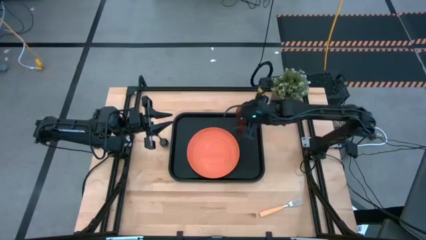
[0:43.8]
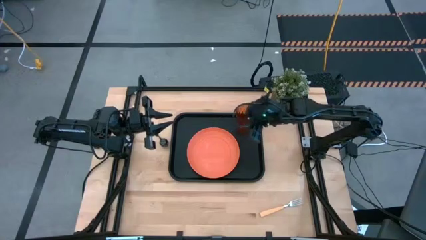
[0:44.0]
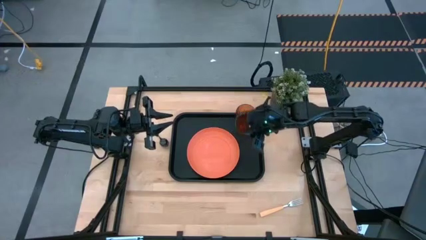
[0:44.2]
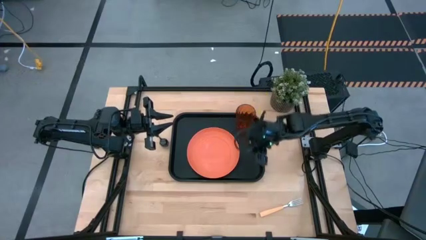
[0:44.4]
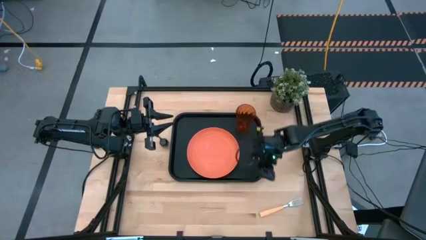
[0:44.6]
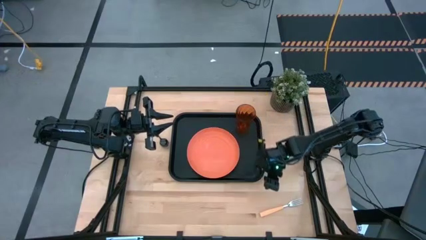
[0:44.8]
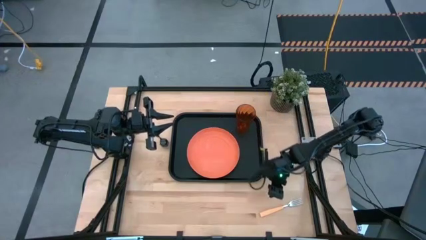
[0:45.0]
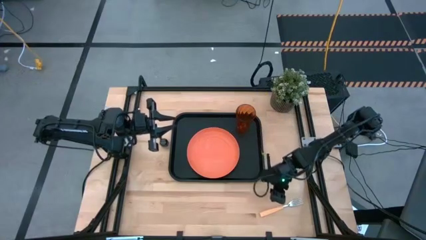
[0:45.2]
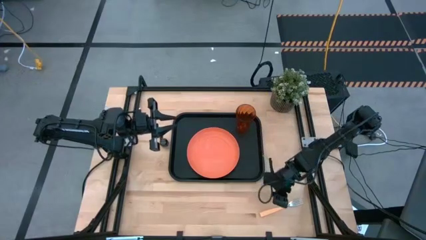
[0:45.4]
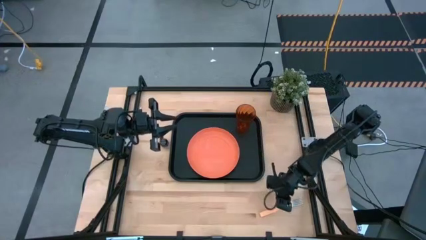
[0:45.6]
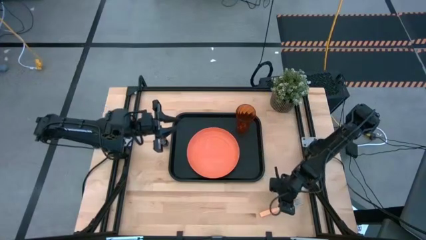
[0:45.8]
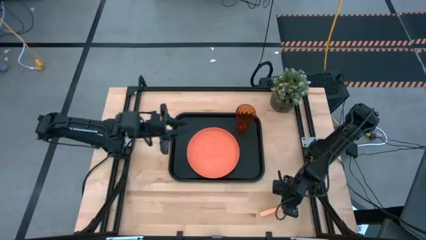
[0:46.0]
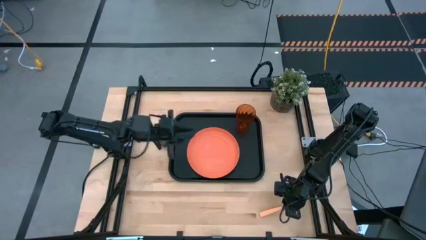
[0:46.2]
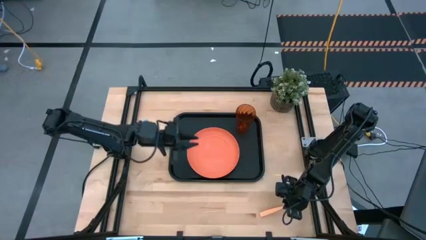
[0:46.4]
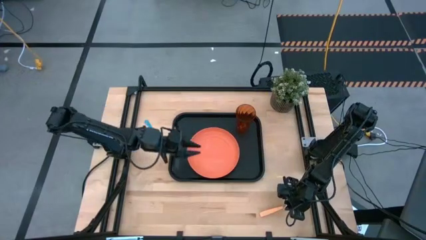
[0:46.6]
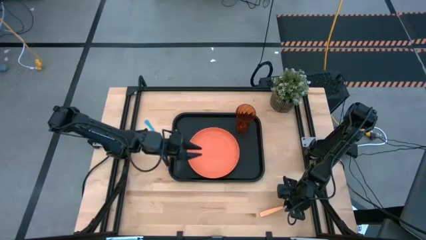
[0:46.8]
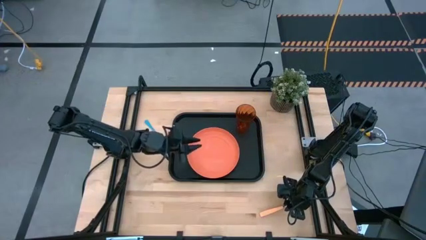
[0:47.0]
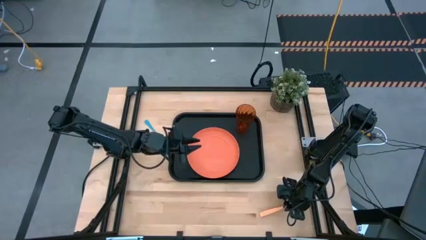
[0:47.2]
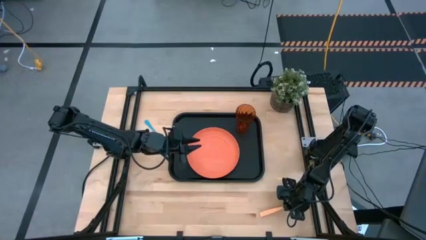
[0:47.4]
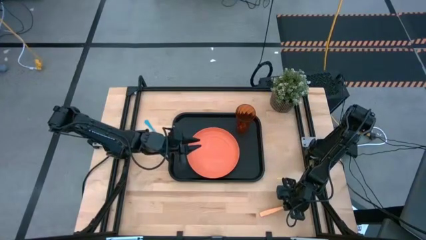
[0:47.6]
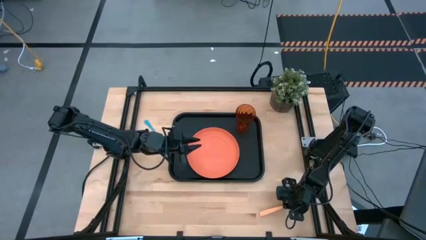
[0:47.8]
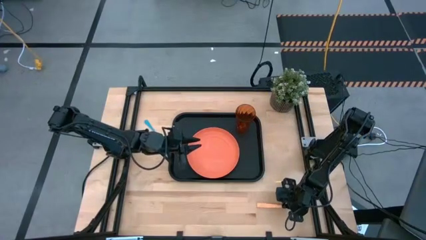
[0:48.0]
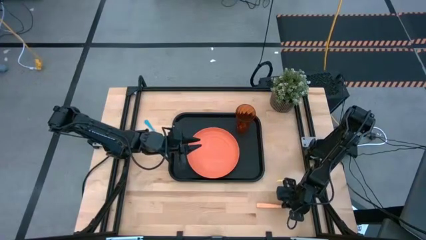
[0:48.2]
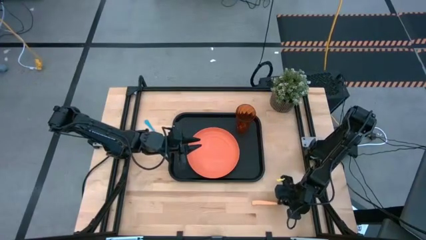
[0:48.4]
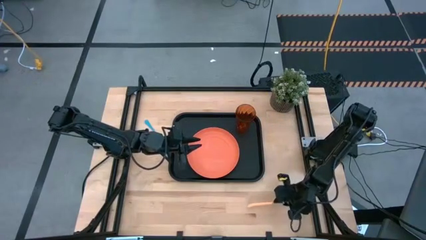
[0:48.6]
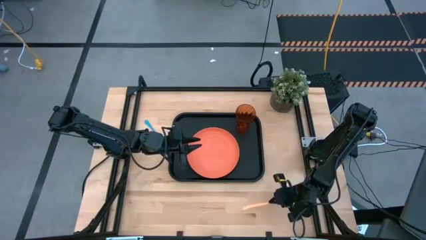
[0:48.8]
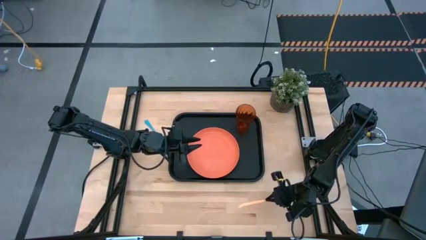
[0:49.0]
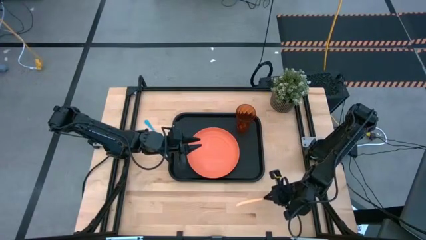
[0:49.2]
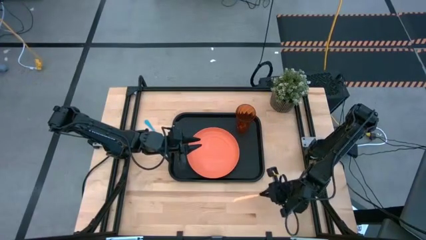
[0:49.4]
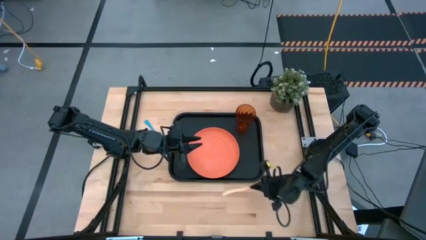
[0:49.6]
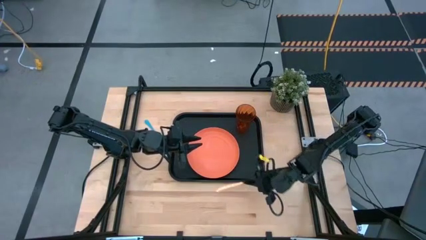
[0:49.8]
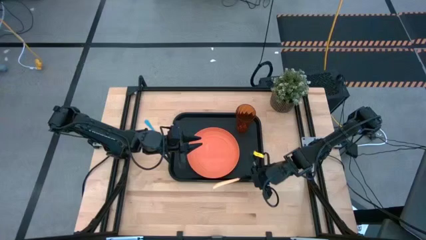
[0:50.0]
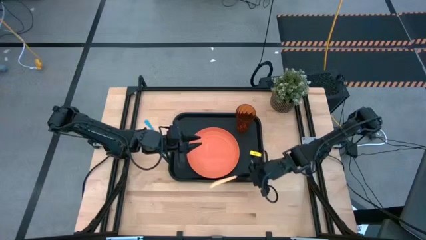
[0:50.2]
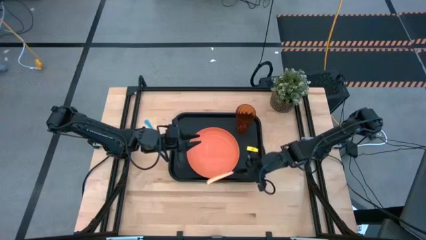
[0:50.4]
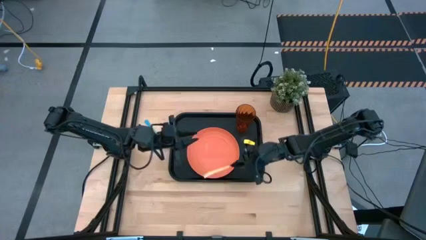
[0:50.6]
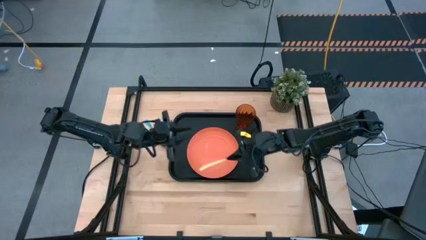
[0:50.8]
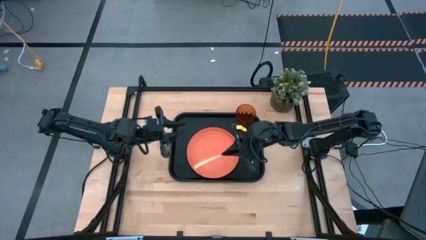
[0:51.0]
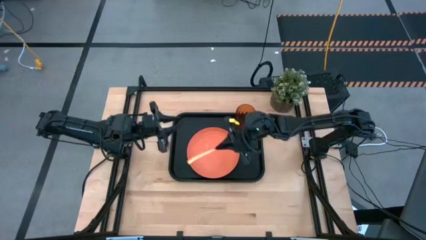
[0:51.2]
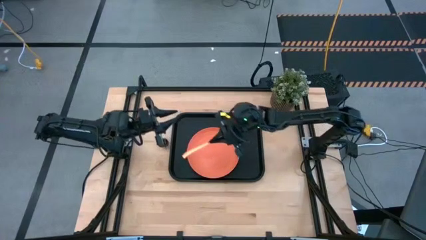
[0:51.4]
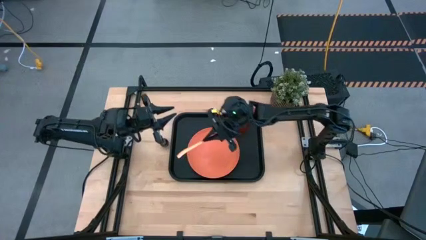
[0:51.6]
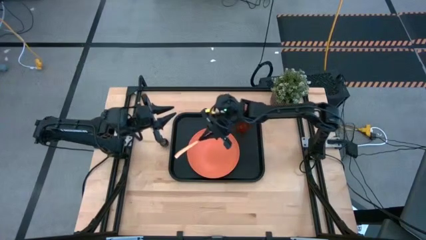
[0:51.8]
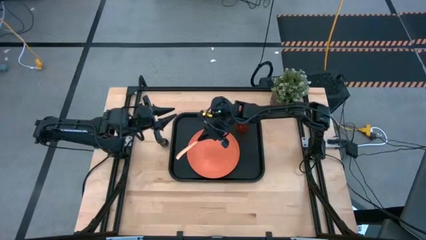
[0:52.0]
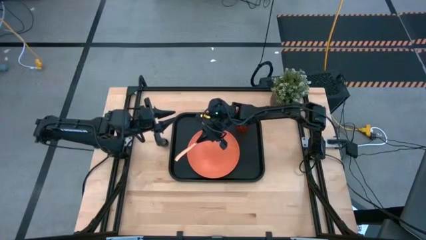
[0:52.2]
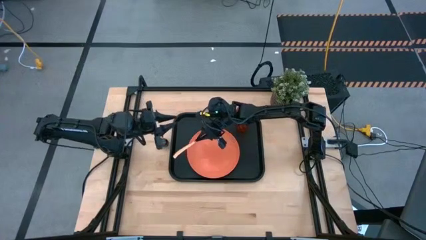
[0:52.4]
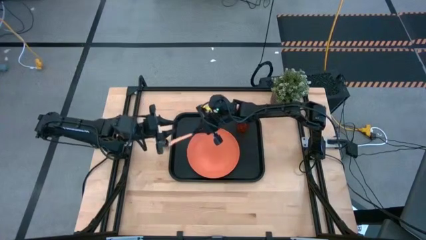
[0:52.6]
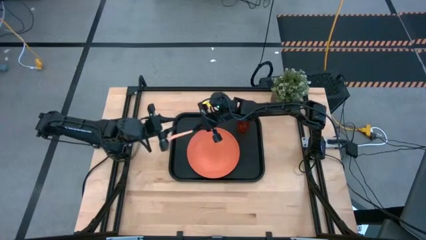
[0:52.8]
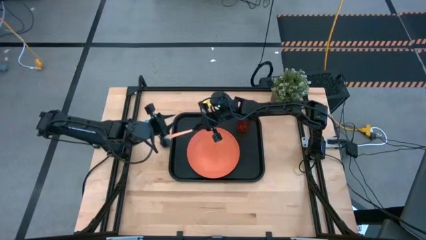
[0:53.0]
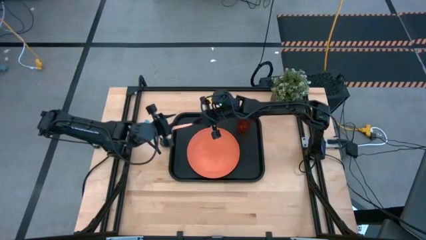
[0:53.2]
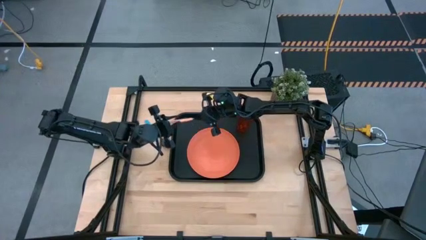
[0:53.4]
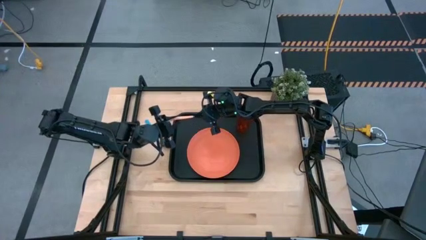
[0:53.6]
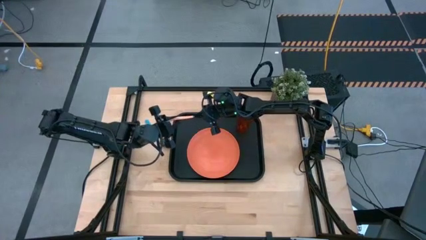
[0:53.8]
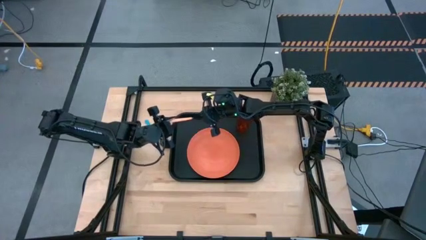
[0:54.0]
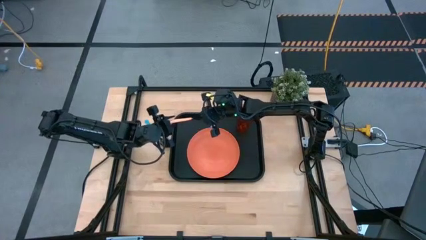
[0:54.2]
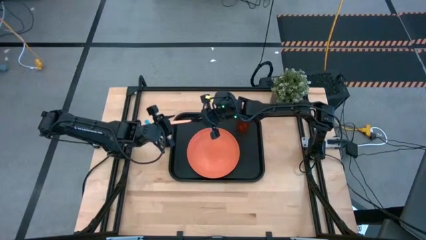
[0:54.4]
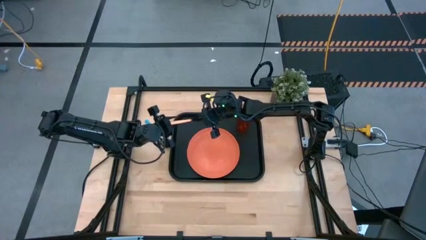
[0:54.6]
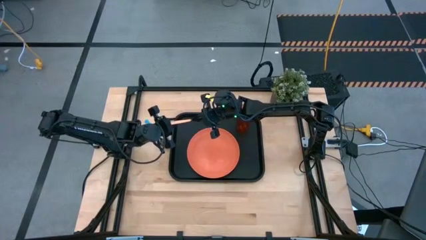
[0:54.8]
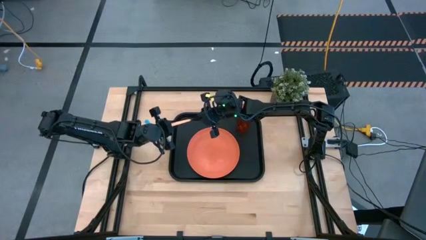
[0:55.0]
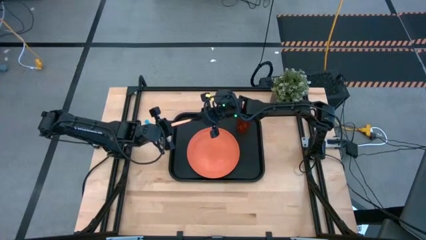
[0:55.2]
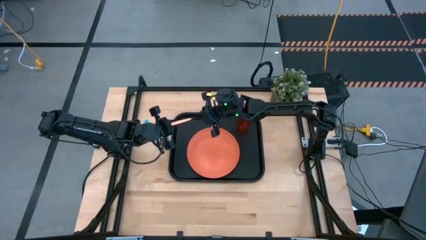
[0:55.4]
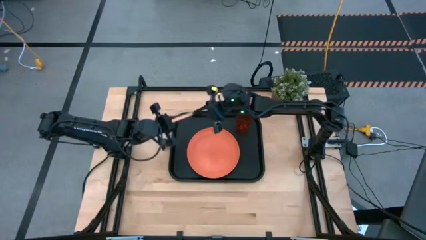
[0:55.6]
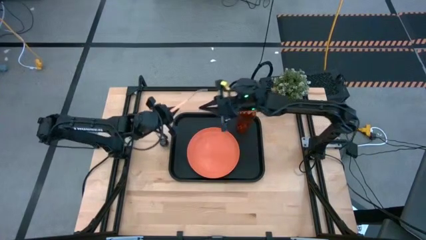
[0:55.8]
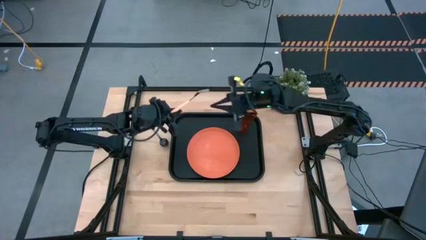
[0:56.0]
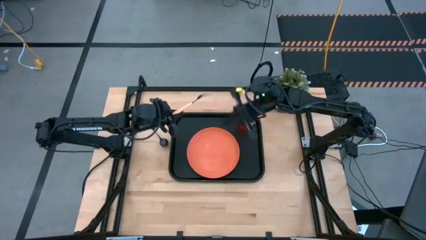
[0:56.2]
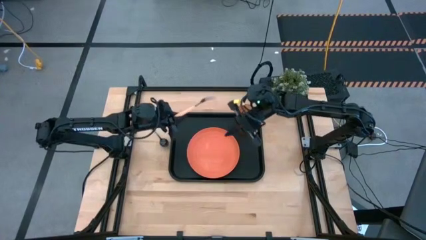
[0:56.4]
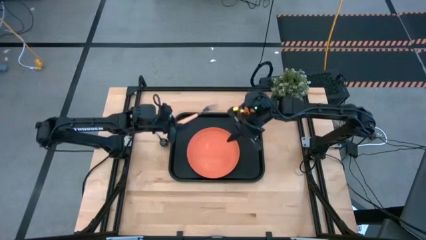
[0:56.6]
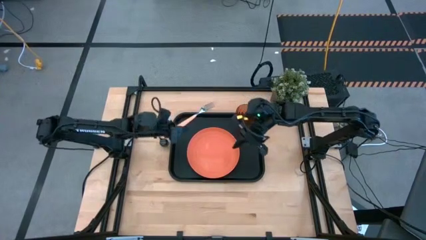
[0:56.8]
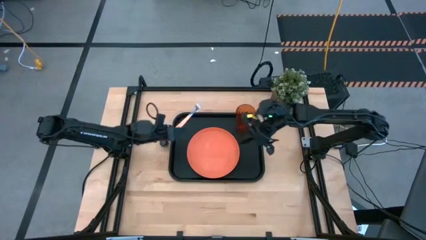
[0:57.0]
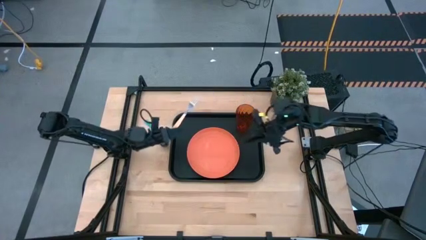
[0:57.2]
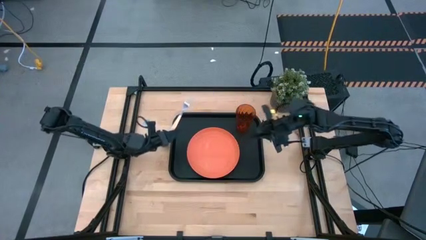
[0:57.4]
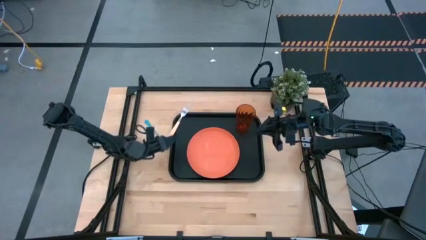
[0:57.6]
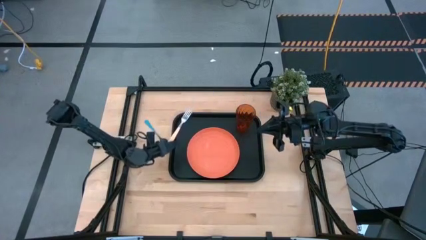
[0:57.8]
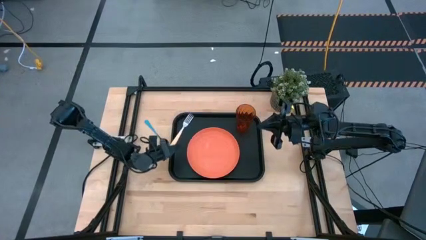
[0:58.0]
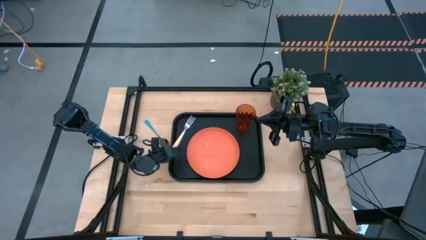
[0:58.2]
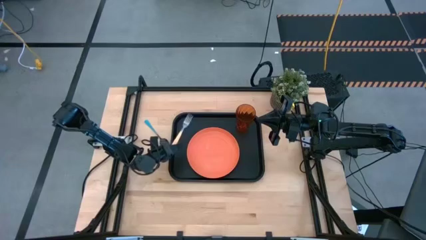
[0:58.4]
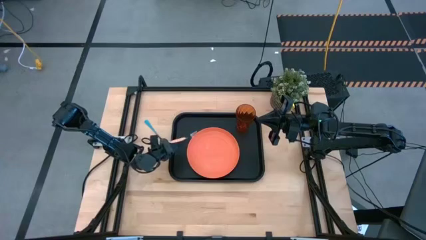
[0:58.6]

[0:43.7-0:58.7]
Task: Pick and place plate/cup/fork/spoon on tray
Put the orange fork on the black serving tray to the left of the orange plate
